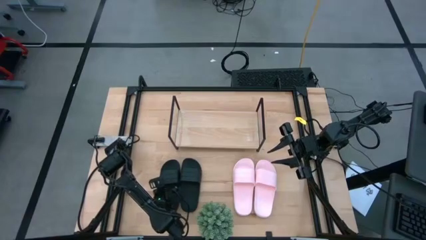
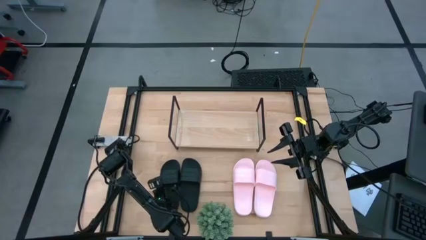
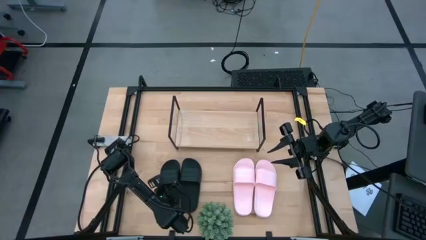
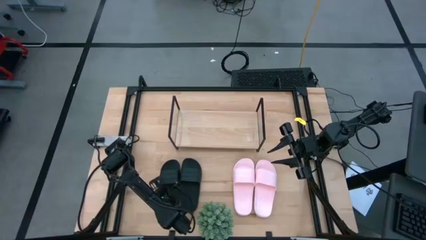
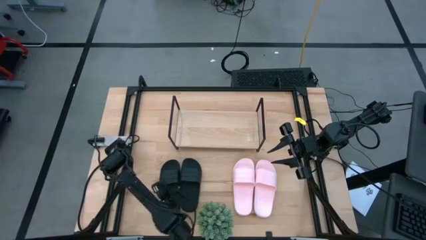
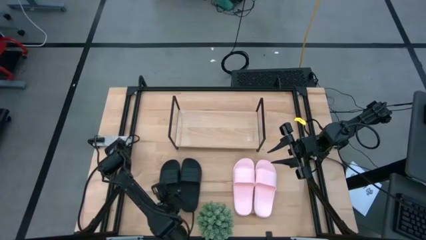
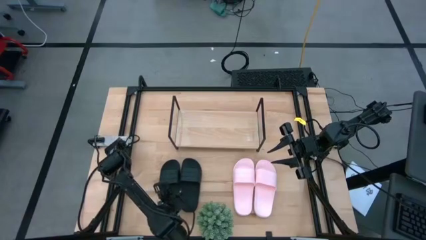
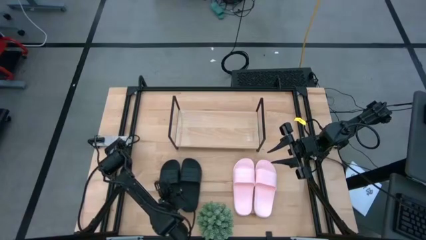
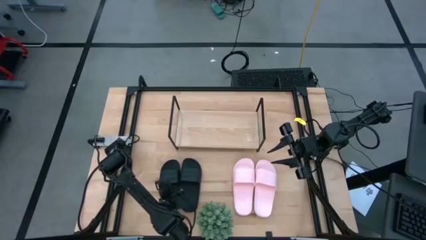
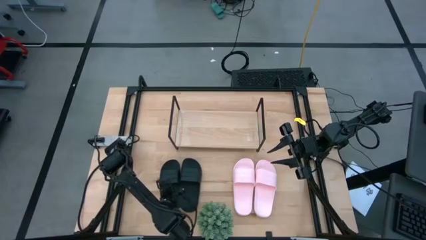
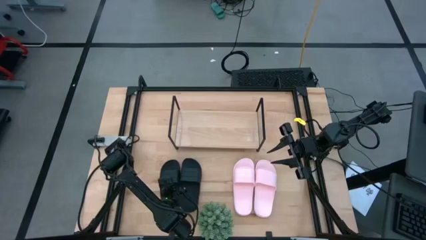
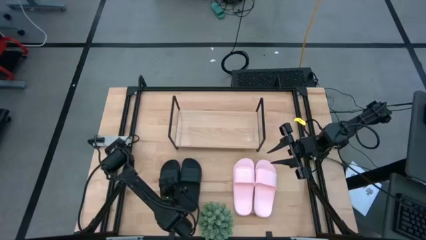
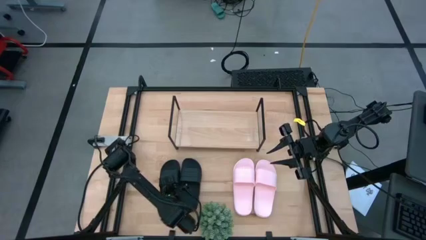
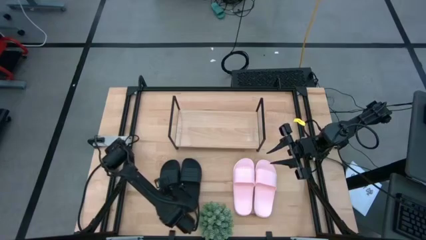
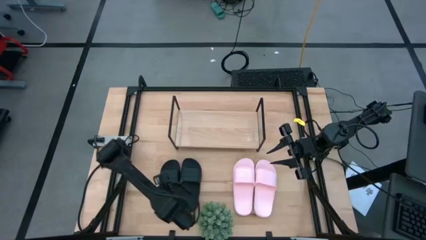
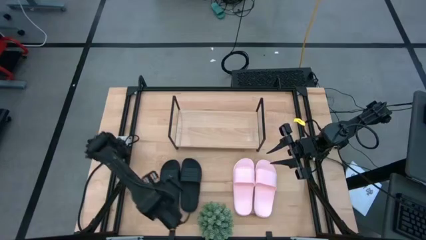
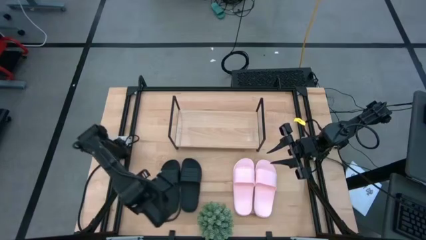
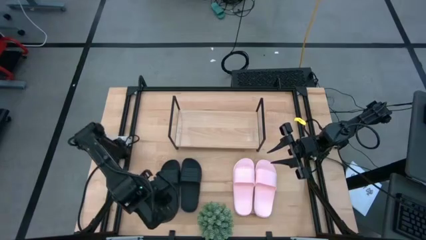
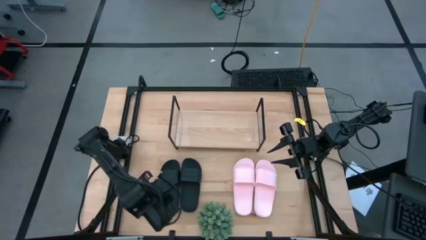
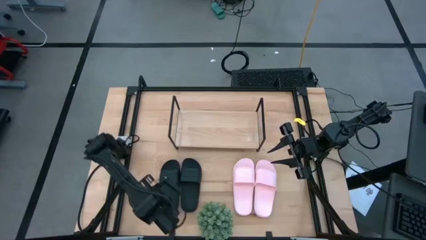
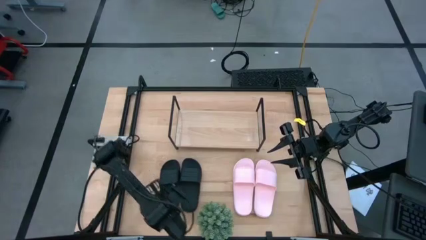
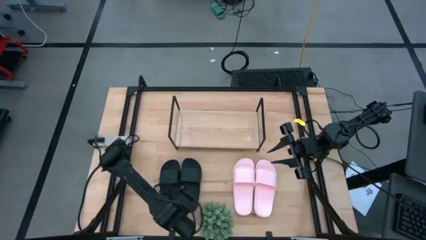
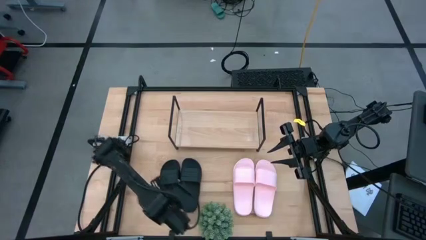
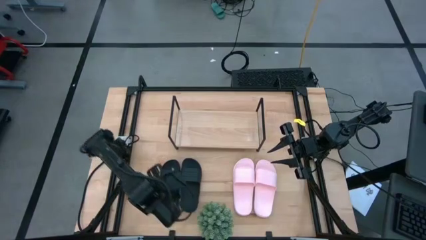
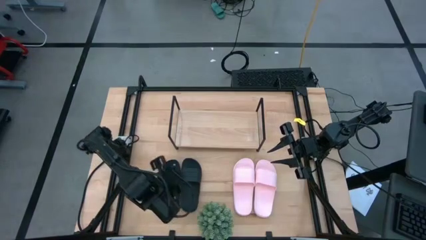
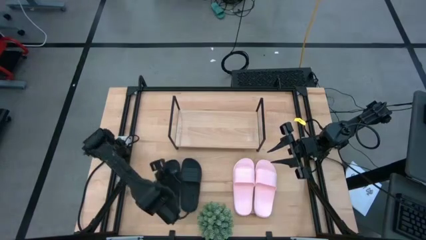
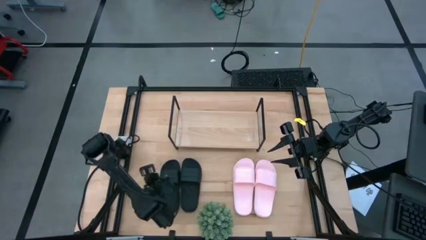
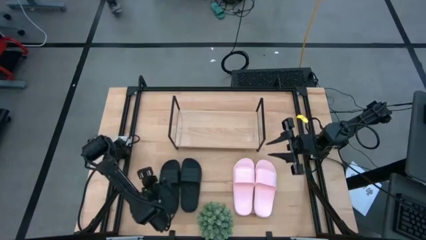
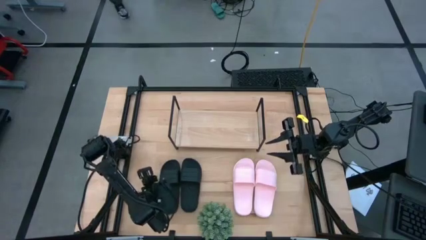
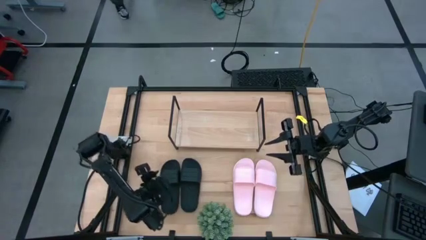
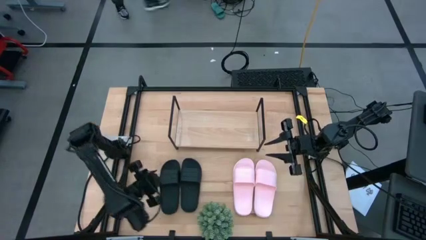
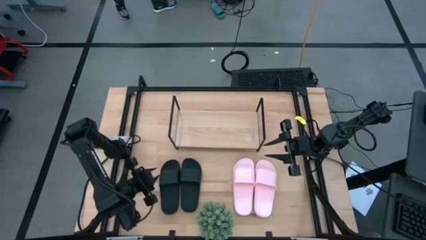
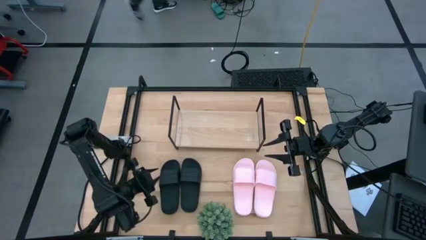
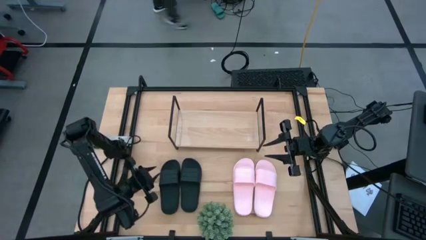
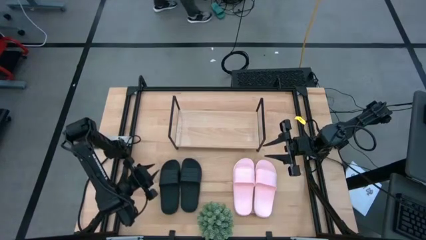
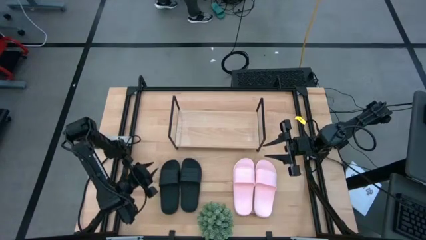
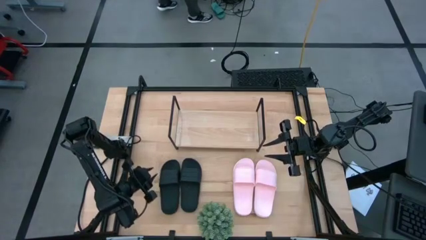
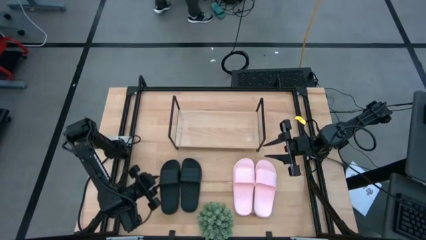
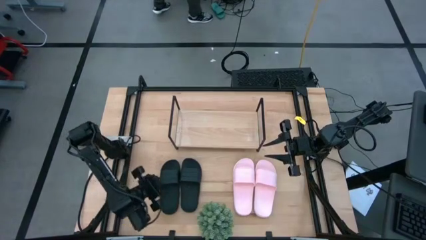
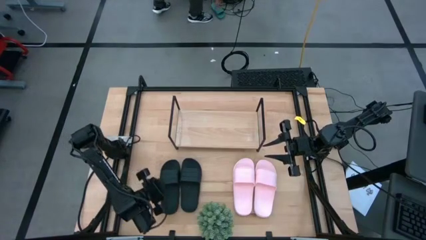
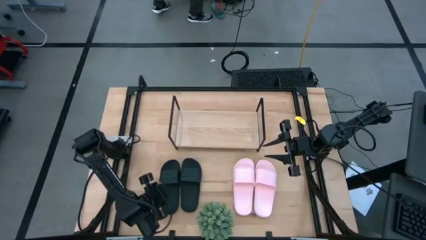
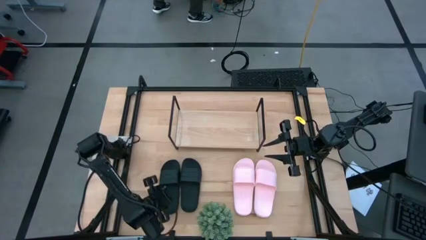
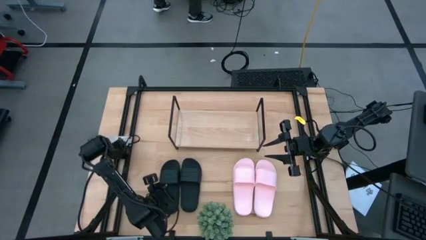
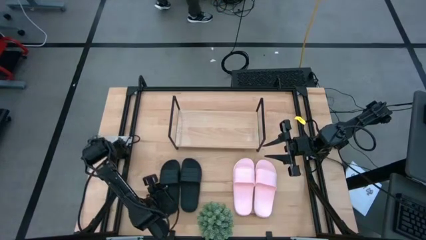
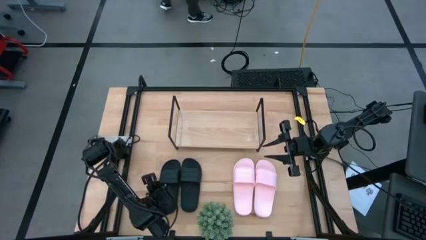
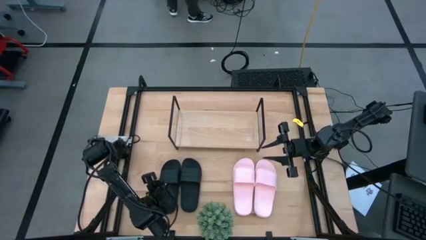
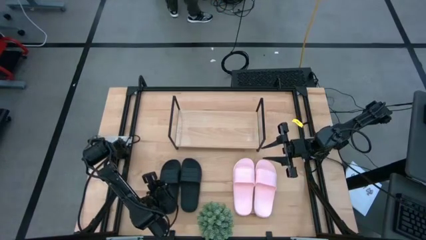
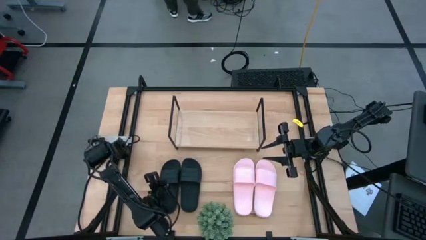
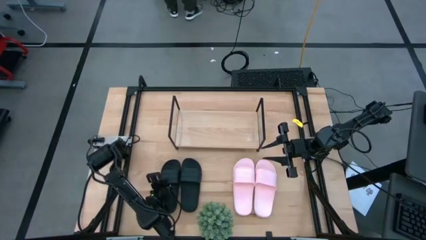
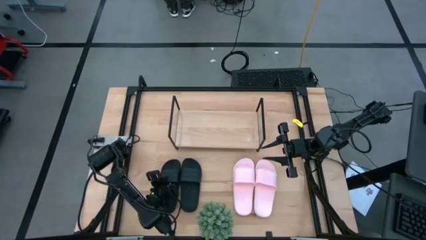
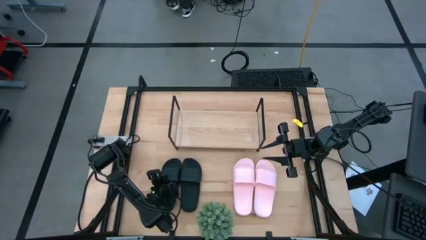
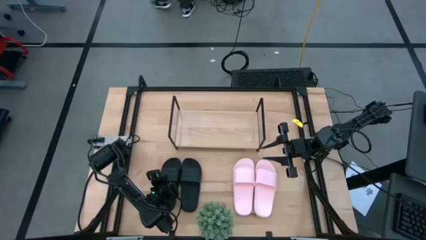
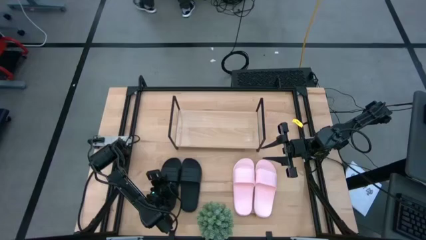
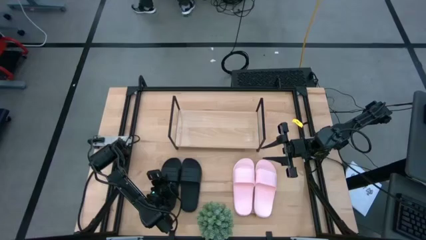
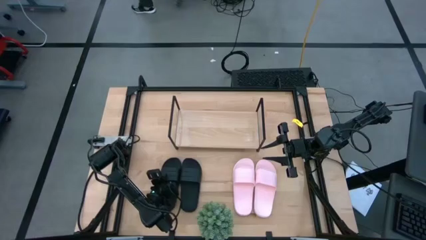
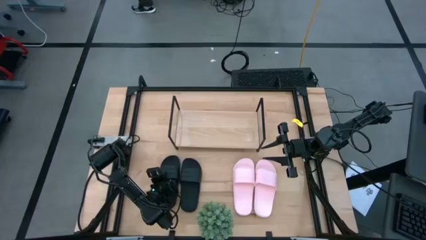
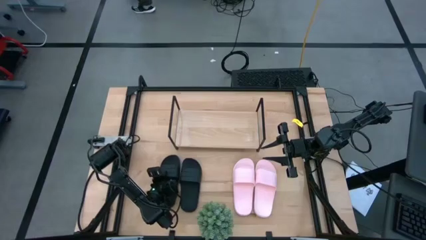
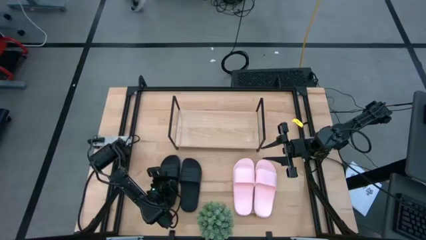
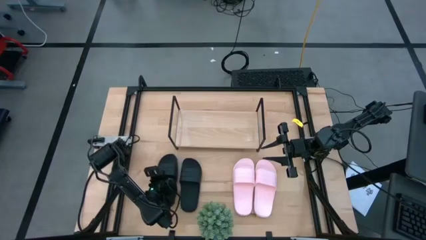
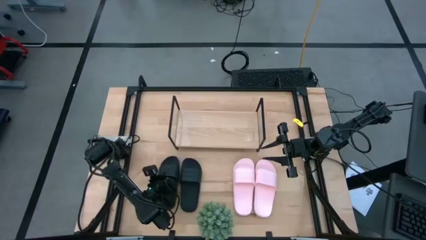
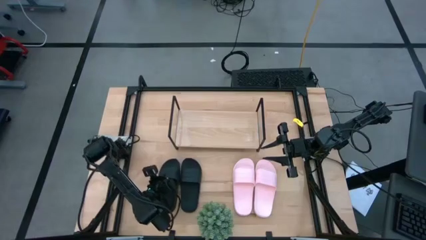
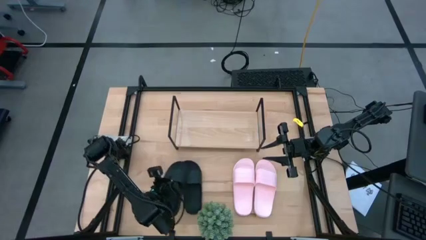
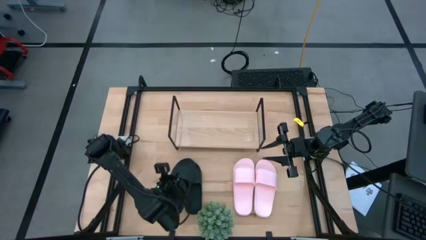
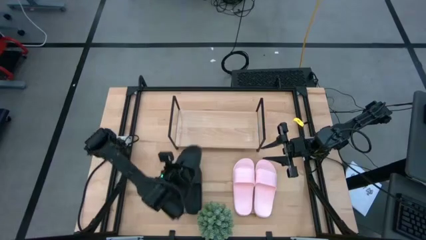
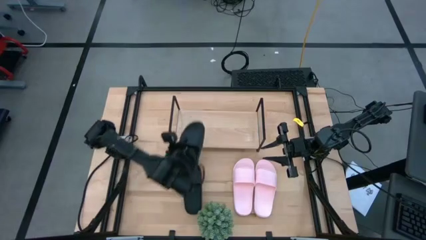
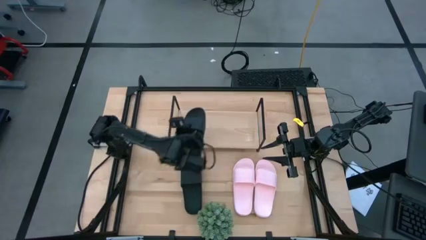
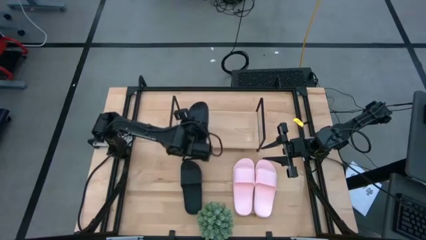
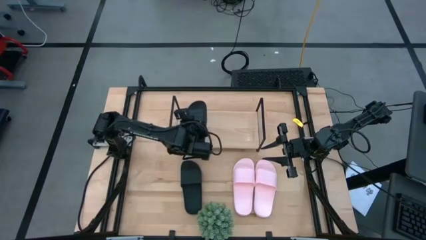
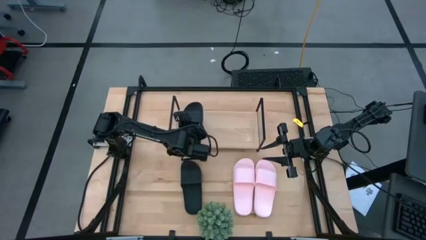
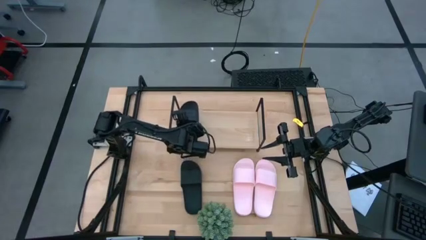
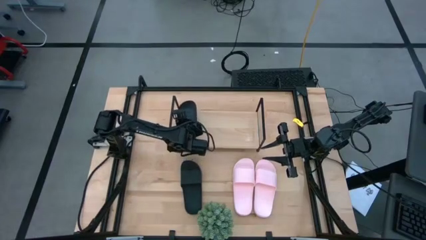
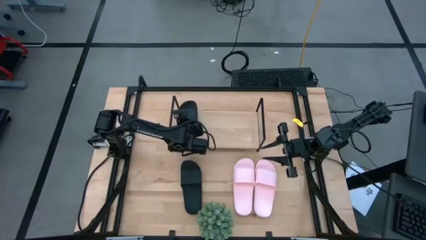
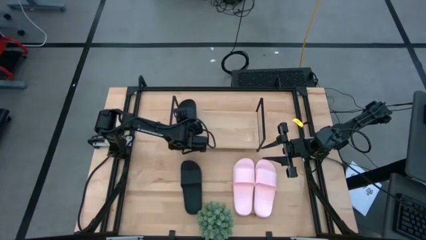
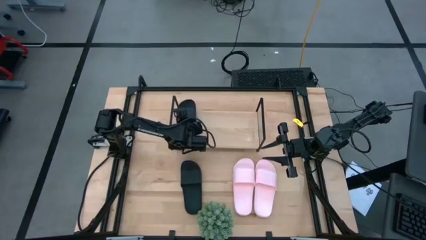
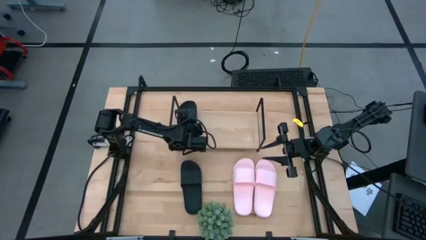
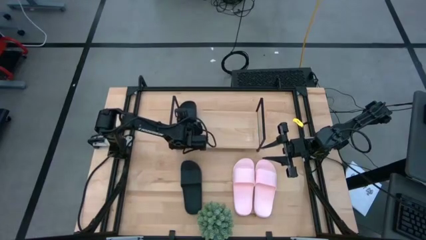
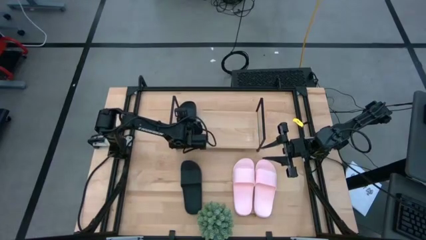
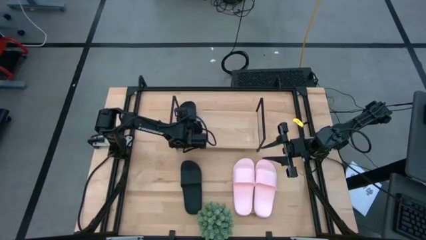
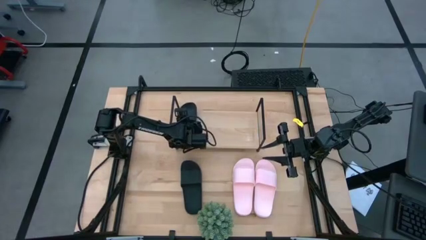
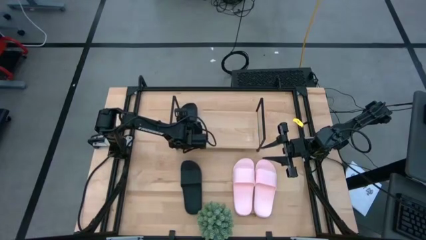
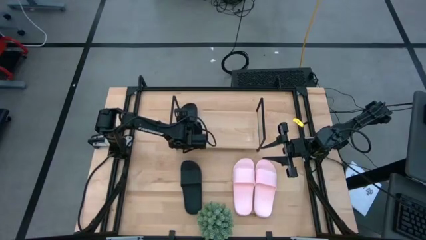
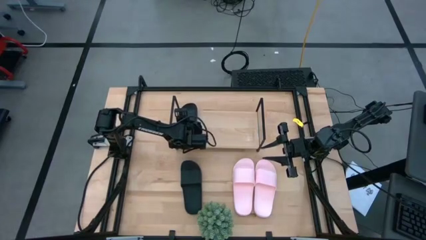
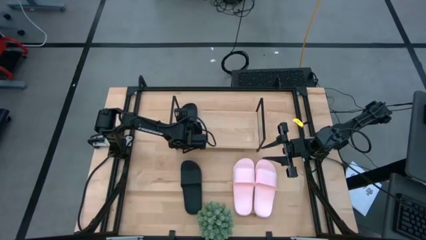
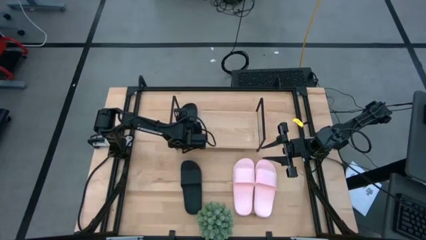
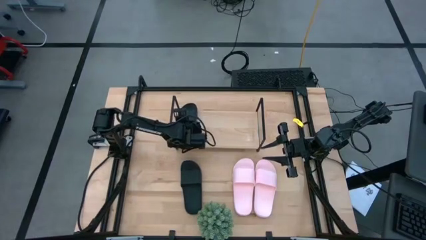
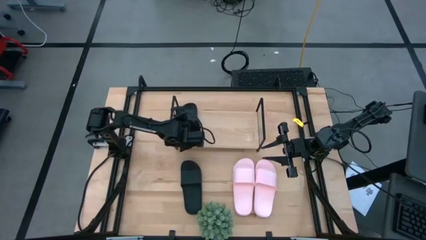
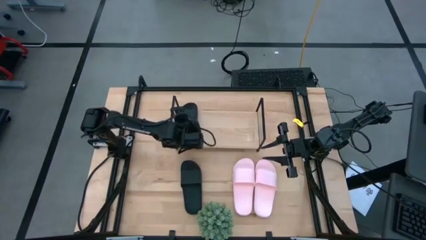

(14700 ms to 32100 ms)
Task: Pick and place slides into the shelf
Put the left black slide on the shelf
